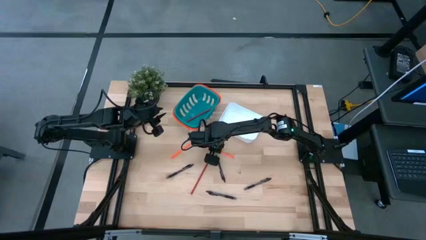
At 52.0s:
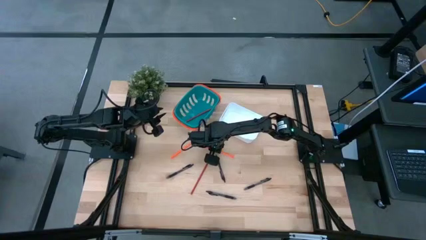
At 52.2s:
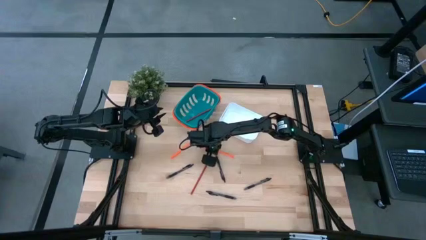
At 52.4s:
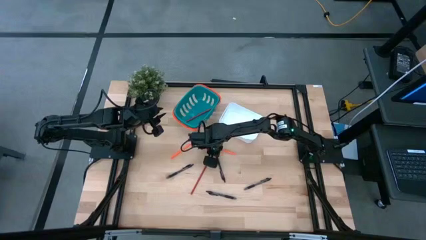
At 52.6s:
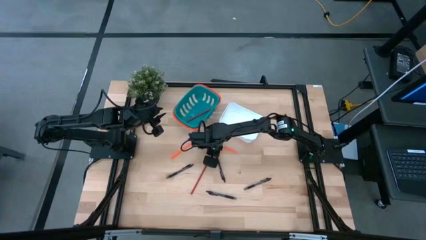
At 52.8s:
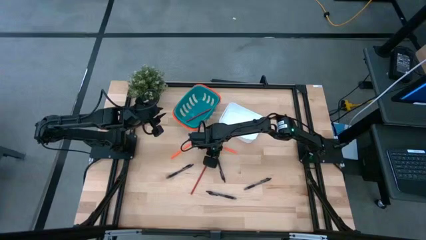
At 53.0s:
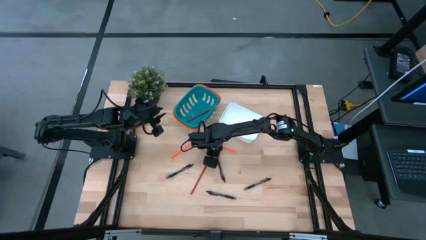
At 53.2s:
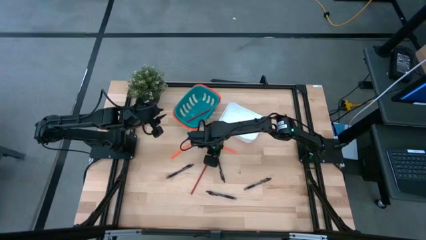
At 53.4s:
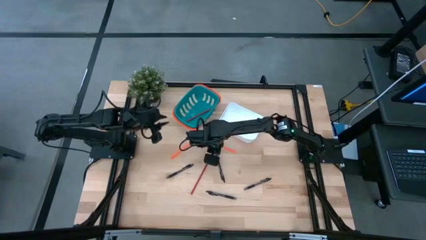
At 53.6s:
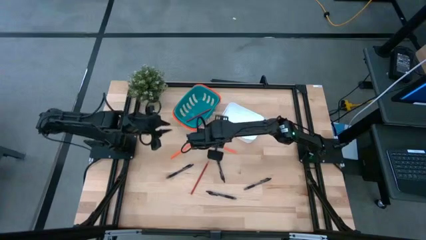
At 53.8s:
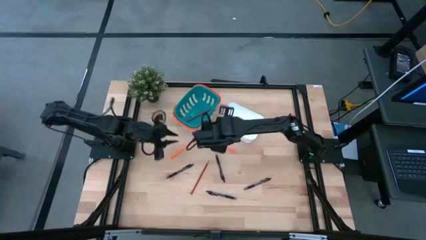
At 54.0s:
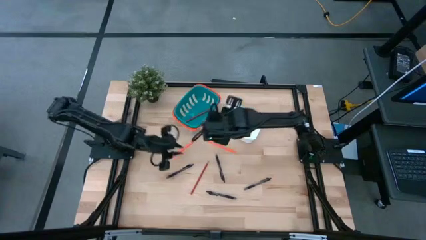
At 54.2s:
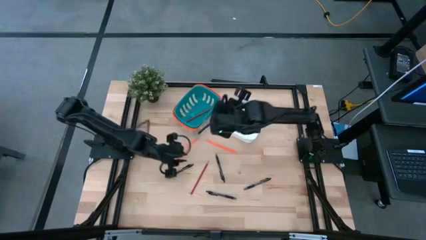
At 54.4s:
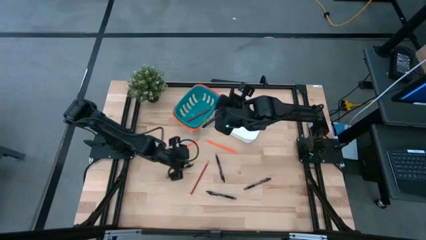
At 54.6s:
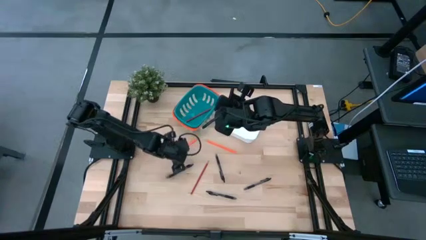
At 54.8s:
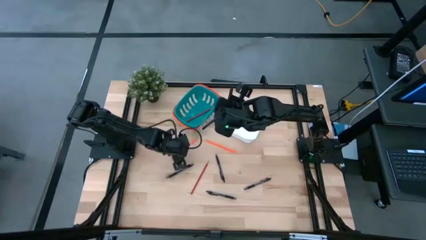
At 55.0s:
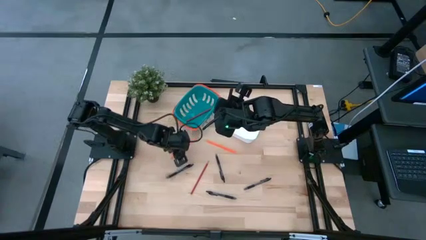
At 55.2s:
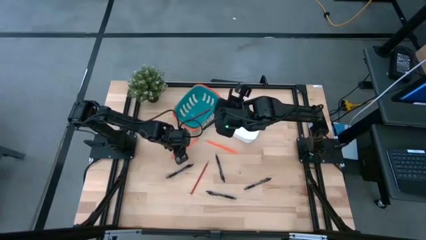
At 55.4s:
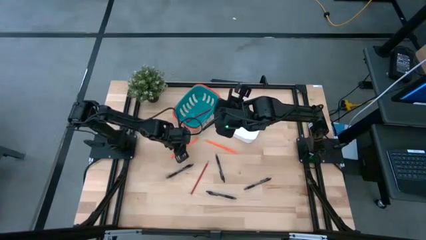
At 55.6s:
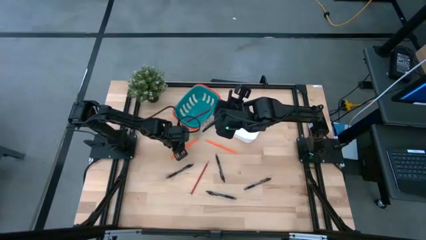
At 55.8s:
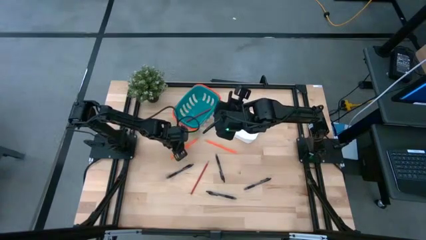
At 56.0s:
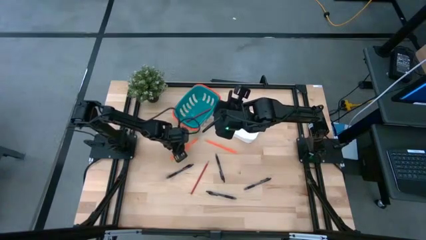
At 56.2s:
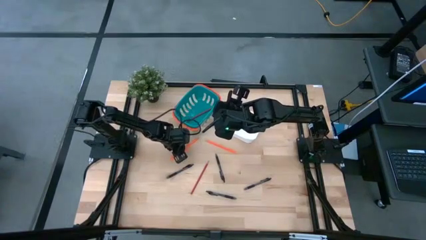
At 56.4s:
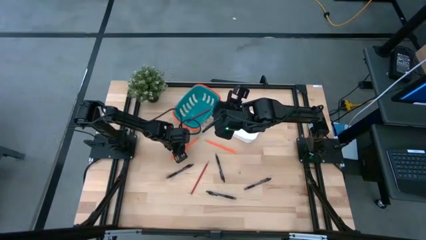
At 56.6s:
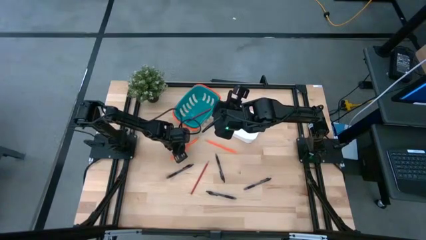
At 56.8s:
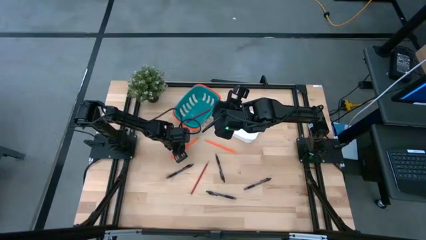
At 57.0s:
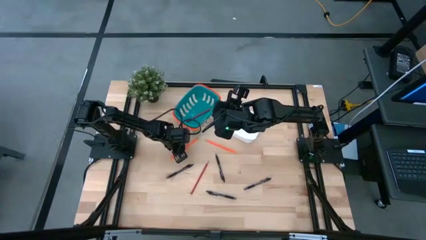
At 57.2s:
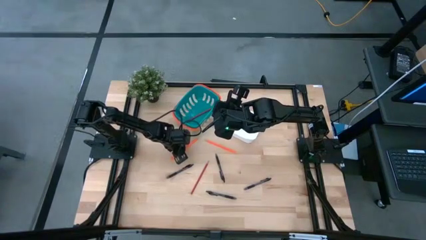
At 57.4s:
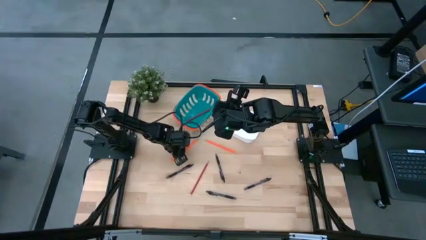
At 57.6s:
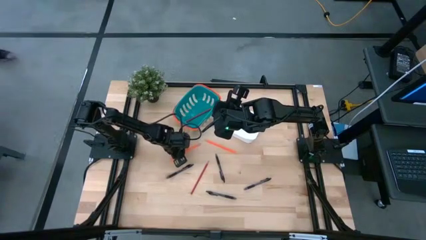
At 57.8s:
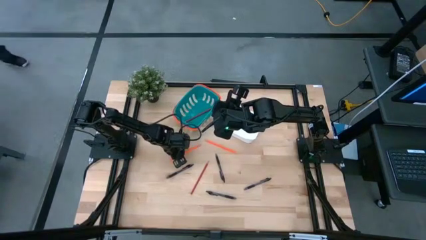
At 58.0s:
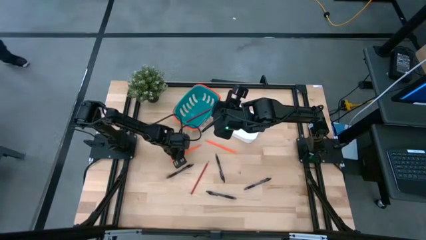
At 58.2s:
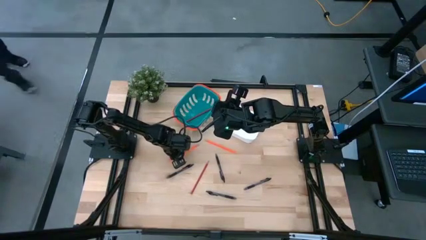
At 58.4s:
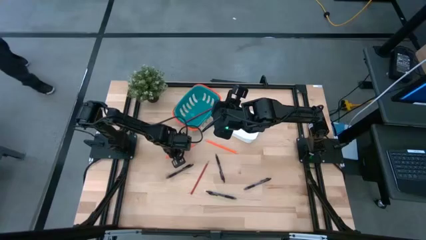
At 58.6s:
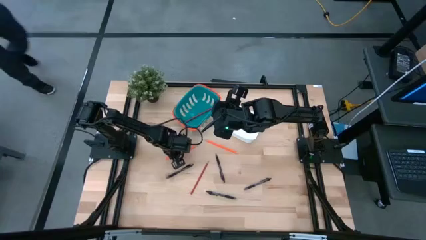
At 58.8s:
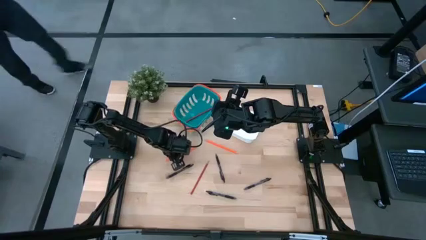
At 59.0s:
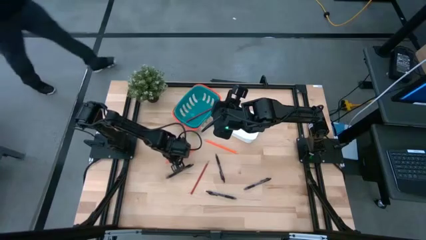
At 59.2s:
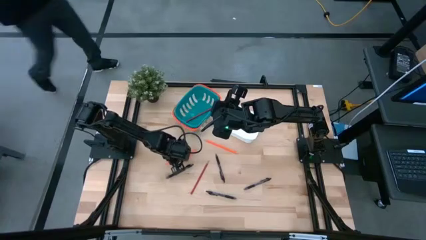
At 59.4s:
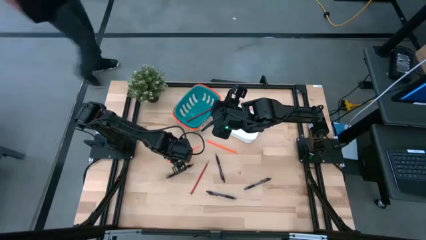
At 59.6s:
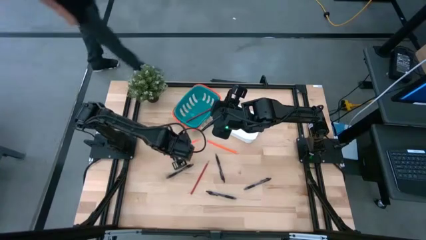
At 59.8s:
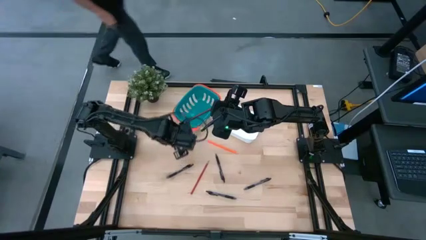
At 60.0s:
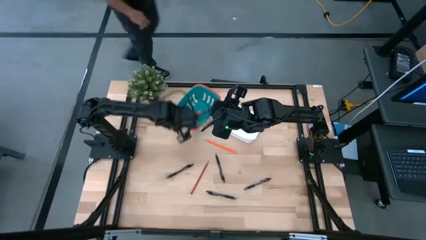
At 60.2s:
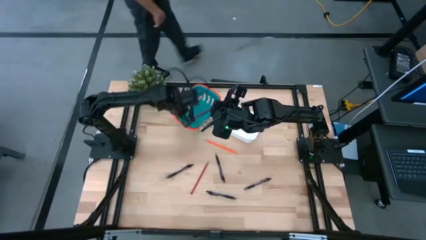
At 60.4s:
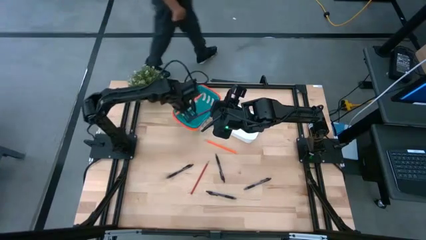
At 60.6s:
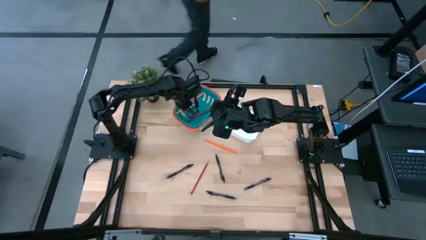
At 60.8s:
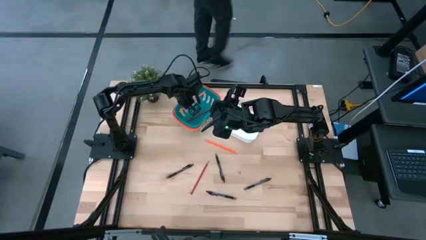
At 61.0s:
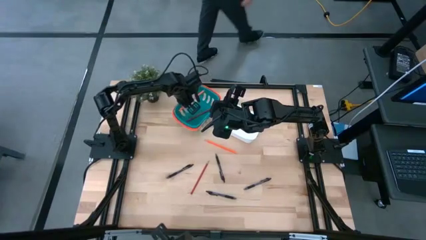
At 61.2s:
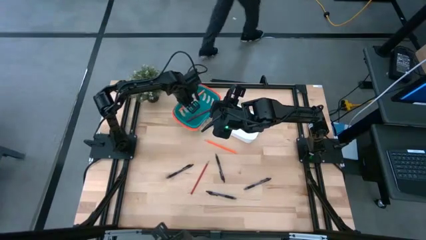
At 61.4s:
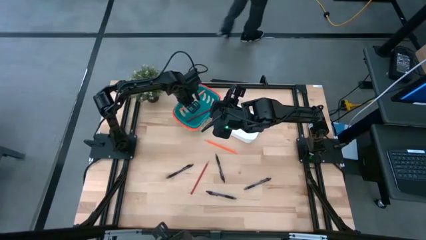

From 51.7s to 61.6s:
Task: Sort pens & pencils
Put the left orange pencil into the blue bin

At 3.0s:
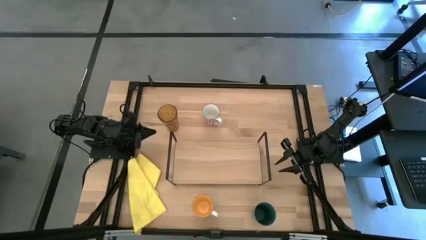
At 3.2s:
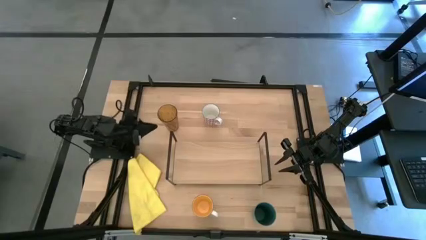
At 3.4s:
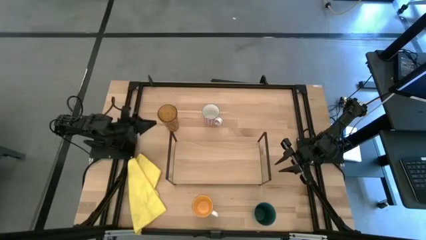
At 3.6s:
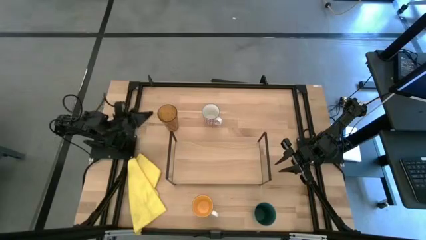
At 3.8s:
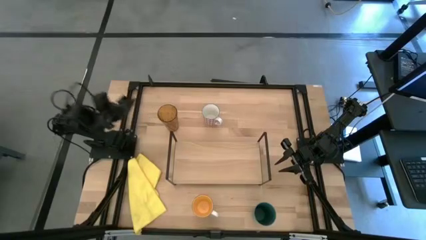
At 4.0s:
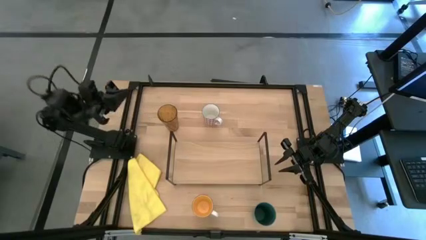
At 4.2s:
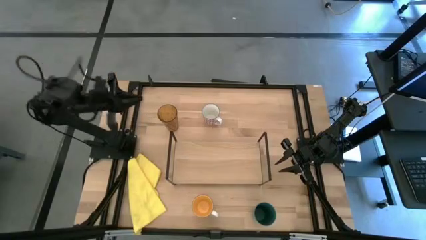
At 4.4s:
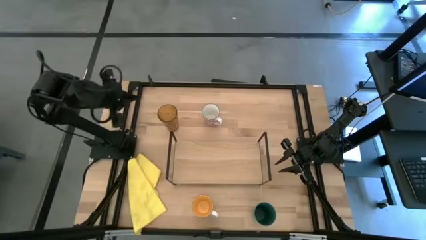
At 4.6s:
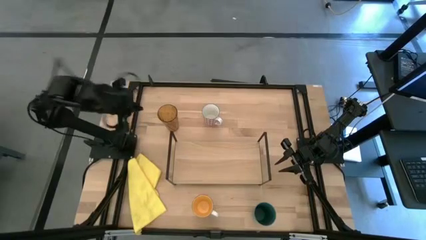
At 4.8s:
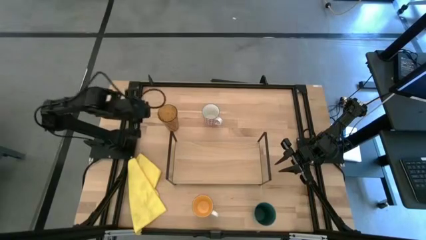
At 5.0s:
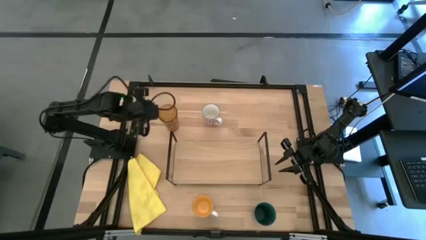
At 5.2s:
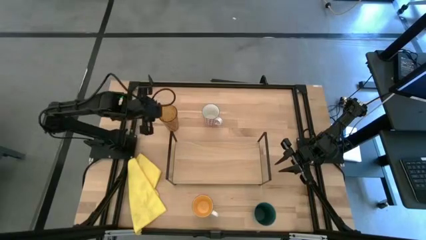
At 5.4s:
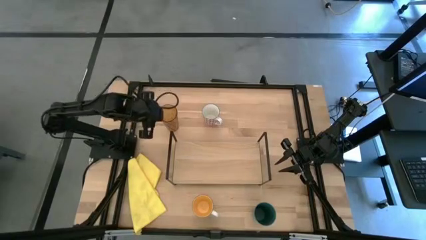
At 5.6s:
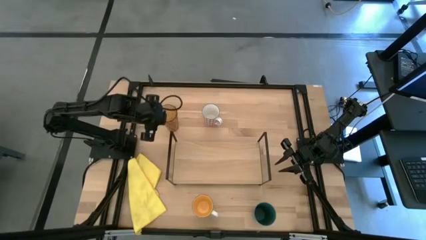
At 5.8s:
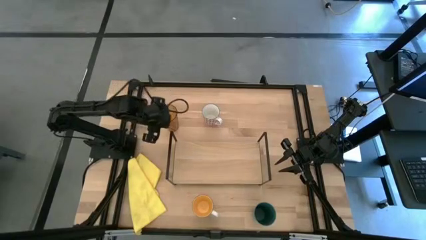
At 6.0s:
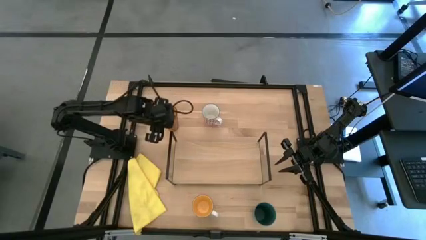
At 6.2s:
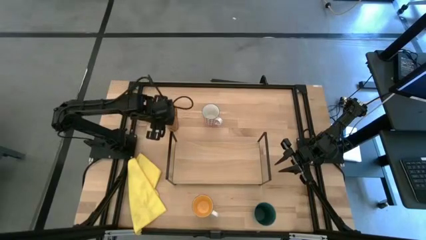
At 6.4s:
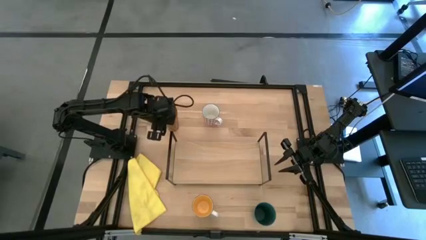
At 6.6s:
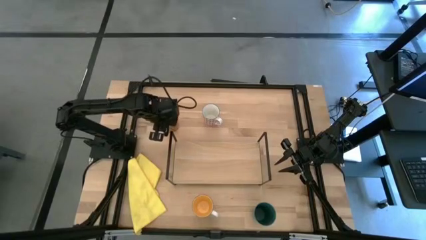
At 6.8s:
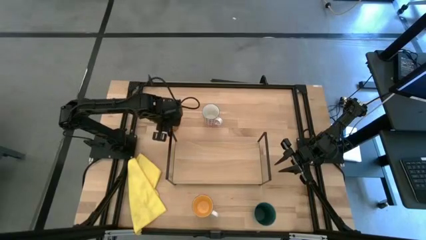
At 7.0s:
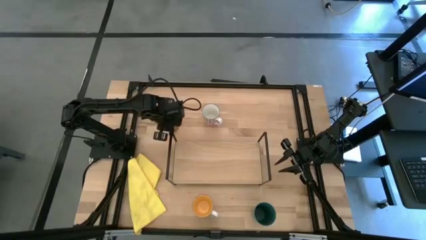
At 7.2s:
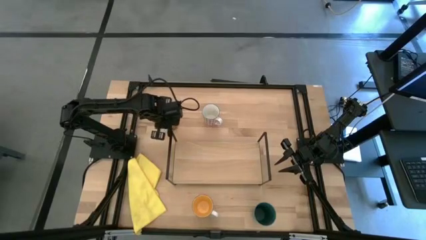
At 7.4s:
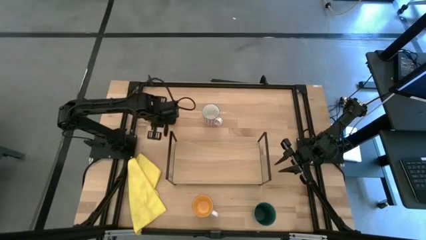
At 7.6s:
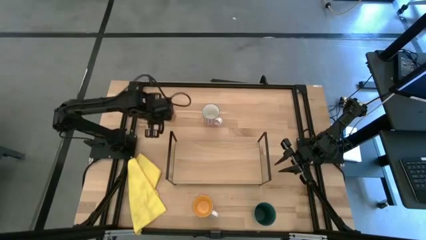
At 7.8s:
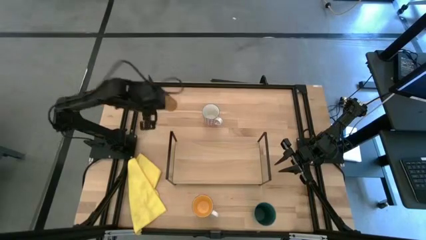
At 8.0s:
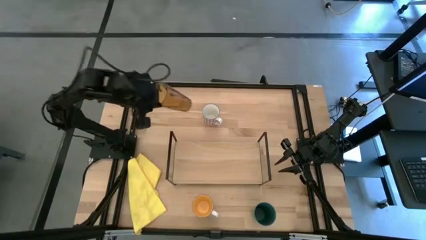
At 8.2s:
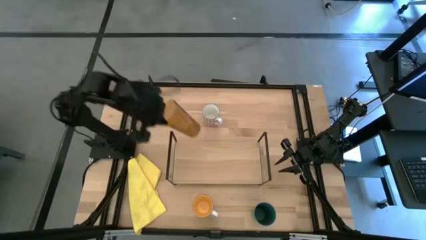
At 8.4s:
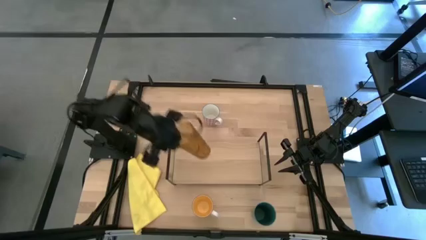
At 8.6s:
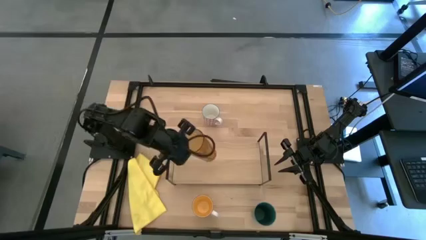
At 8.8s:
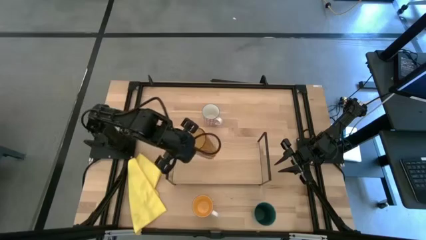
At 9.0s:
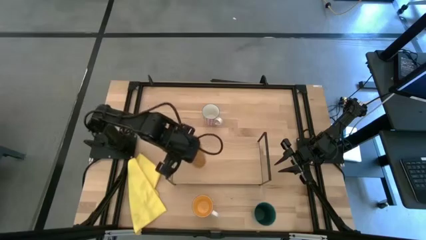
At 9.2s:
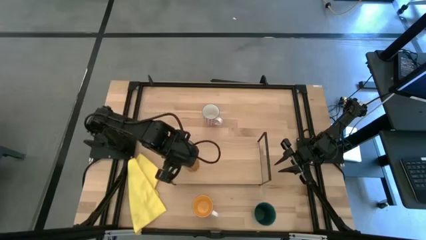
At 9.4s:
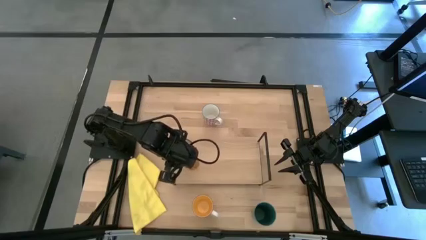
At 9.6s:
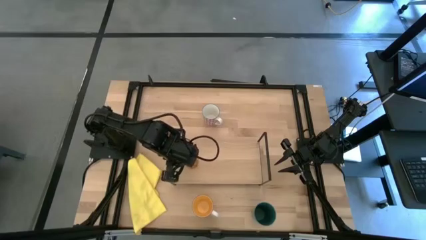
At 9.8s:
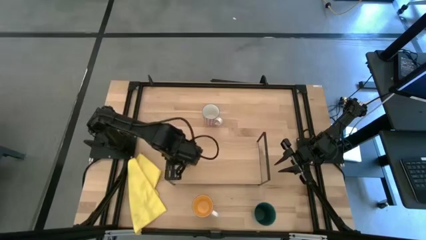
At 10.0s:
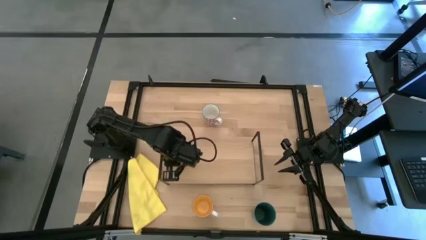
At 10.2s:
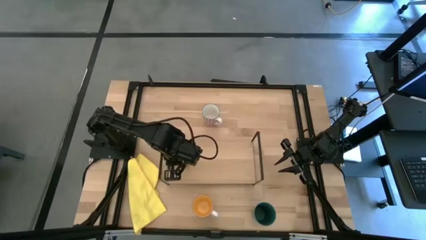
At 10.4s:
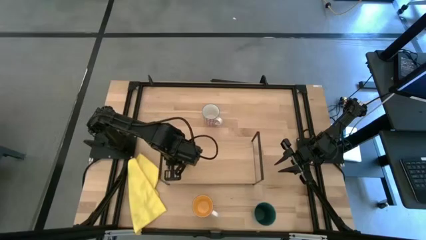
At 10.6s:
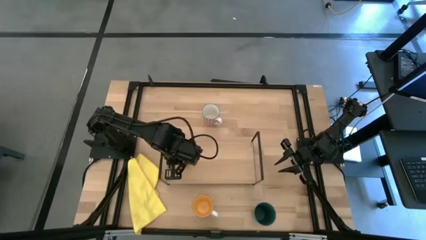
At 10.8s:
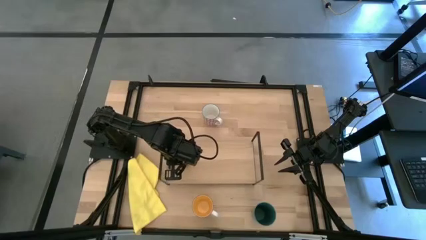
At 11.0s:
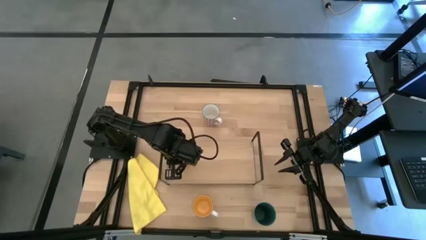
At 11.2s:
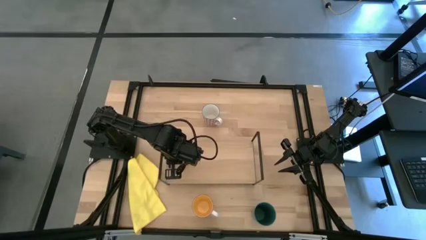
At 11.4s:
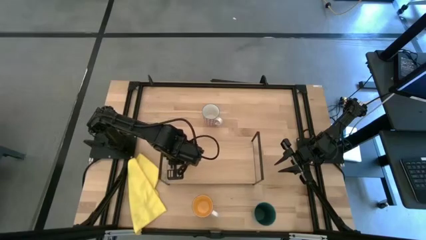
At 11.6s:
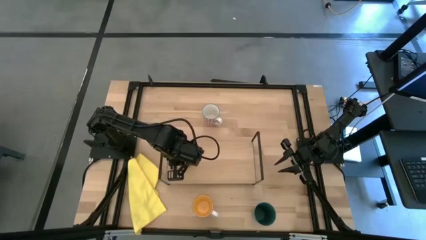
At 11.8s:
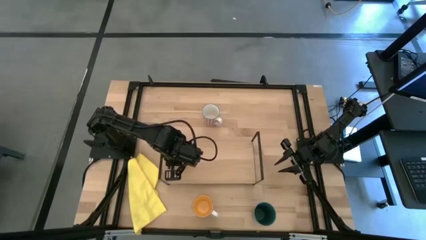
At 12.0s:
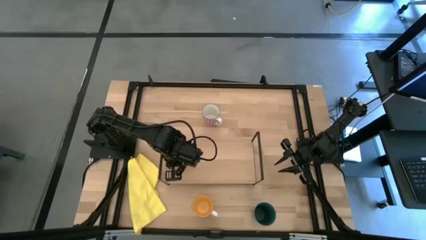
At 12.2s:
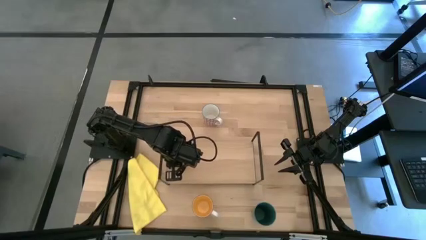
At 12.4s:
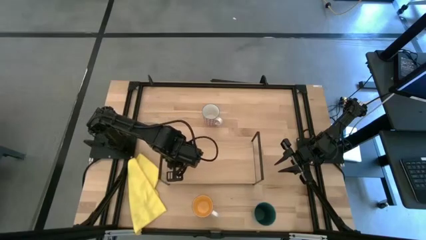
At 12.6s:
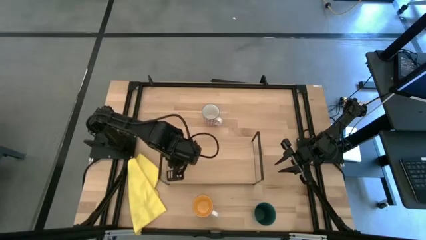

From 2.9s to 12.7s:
Task: Stack small to large cups/mugs on shelf
Put the brown cup on the shelf
